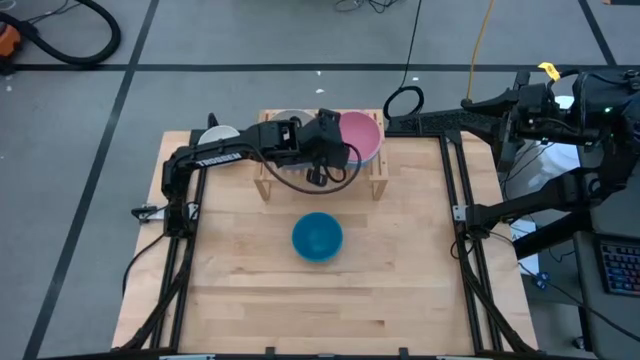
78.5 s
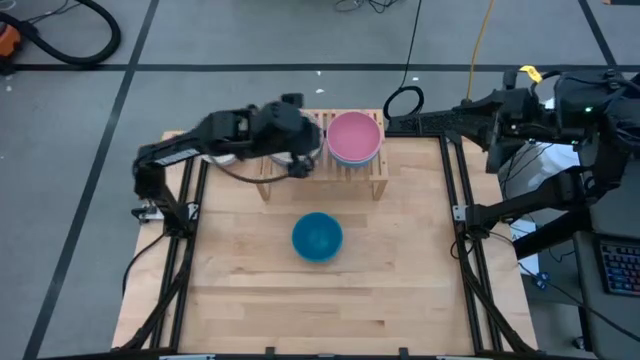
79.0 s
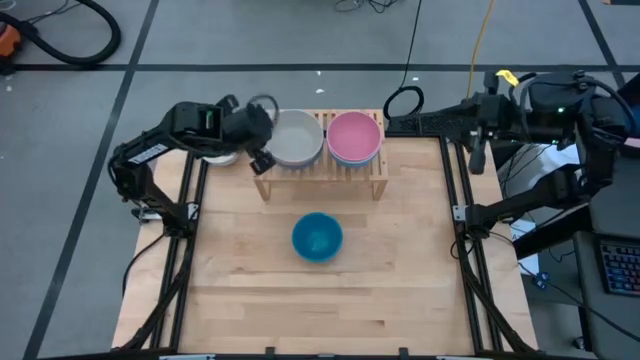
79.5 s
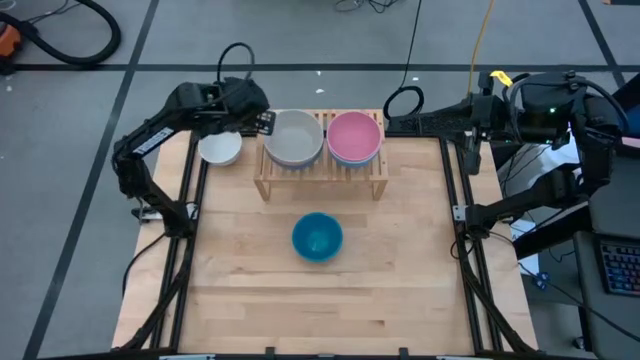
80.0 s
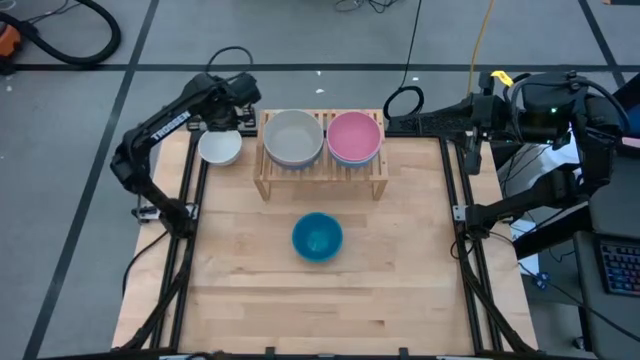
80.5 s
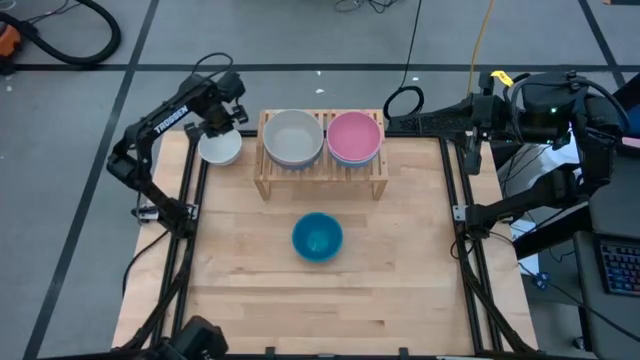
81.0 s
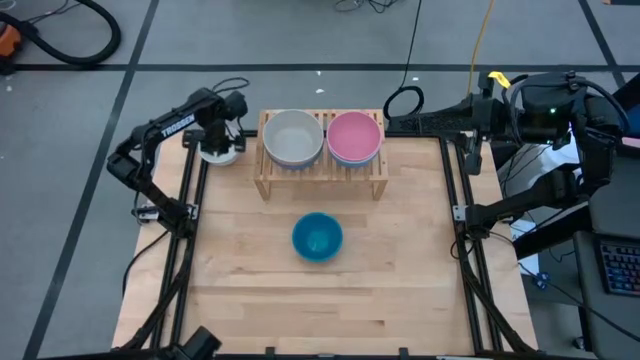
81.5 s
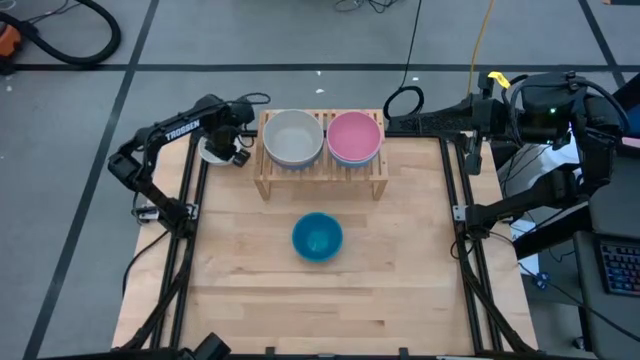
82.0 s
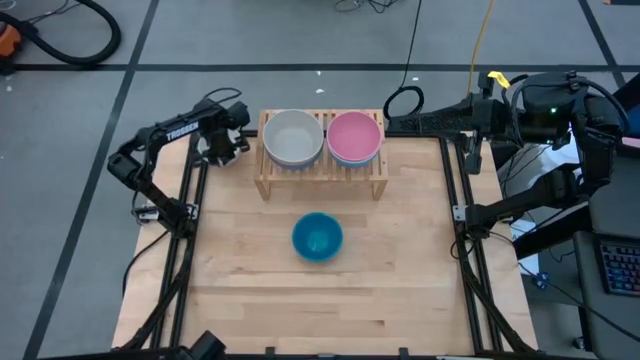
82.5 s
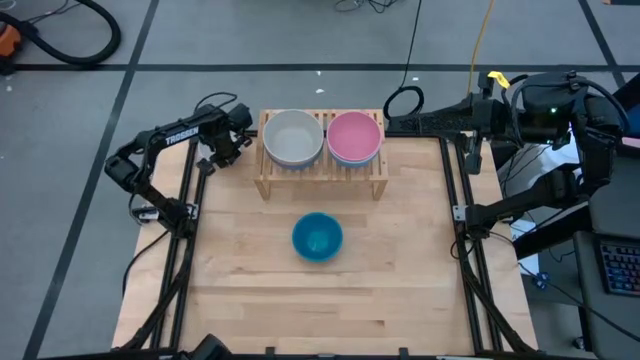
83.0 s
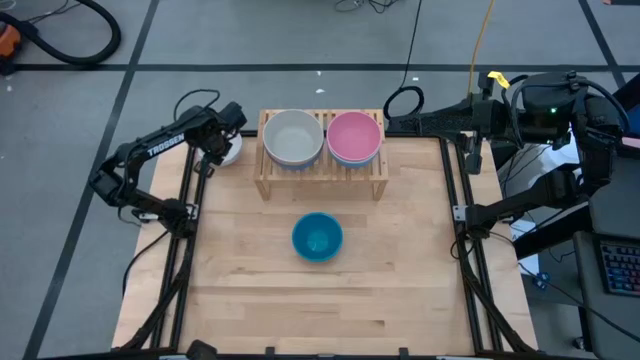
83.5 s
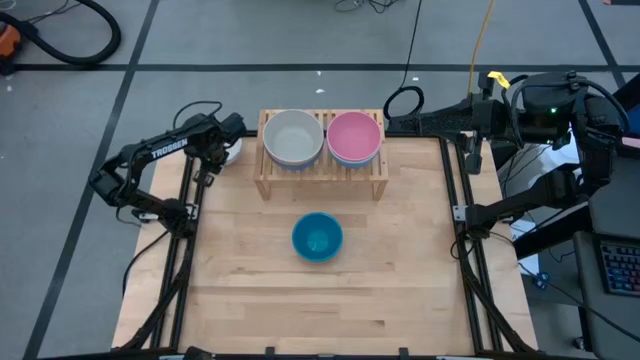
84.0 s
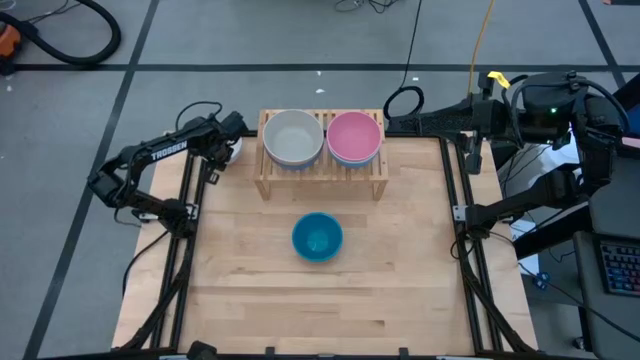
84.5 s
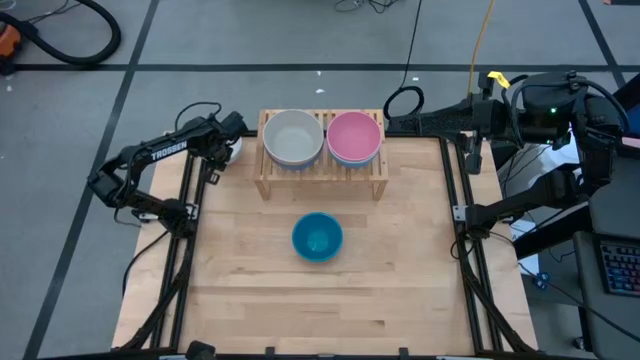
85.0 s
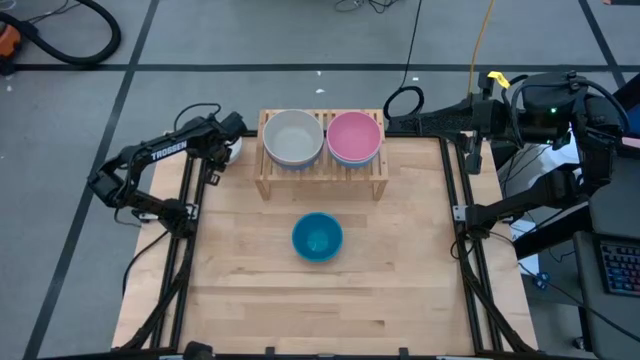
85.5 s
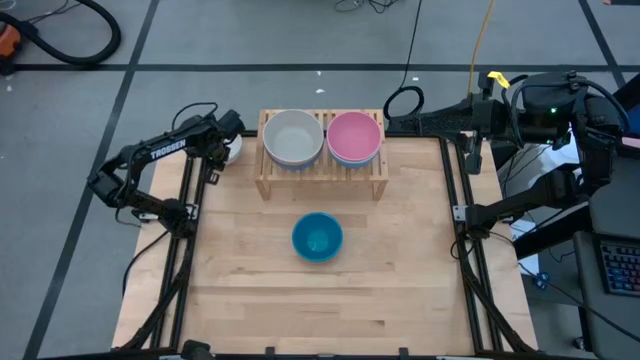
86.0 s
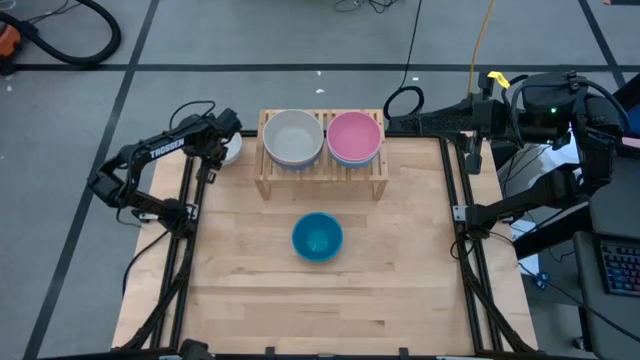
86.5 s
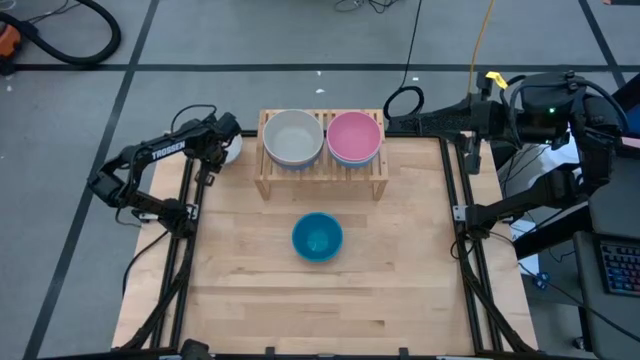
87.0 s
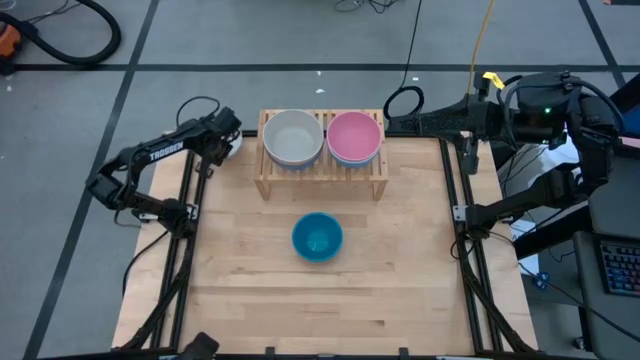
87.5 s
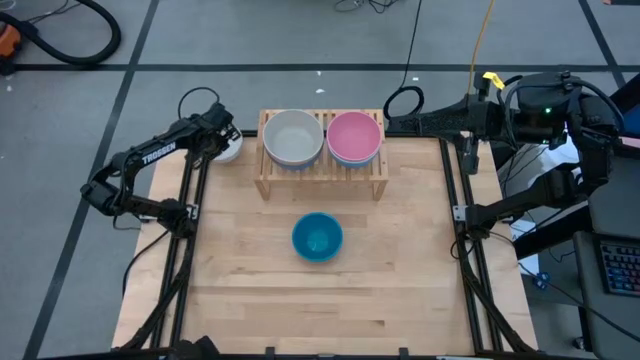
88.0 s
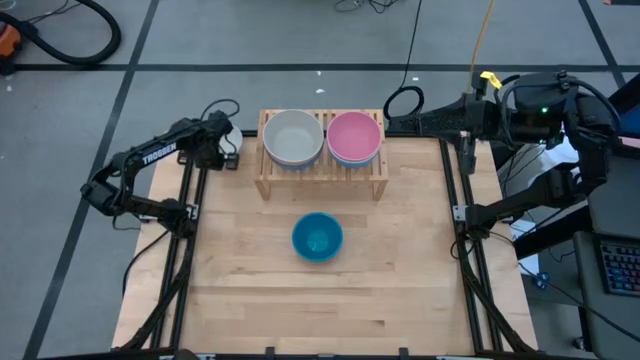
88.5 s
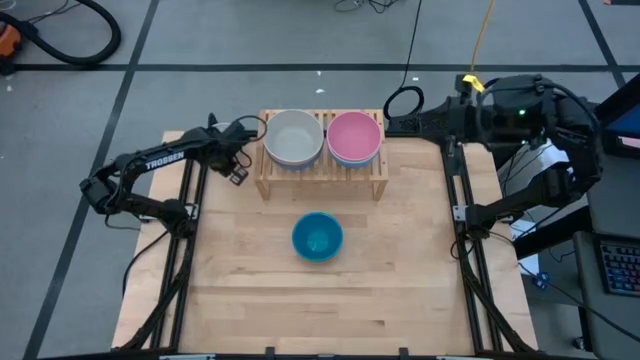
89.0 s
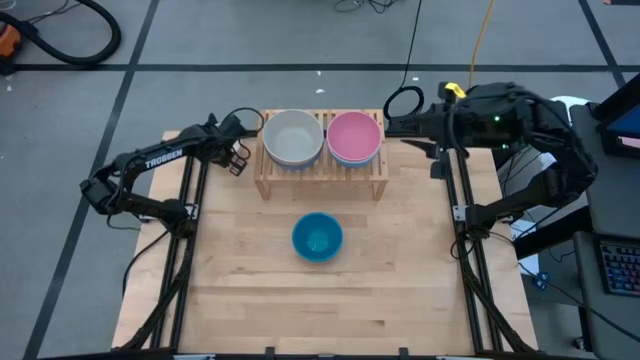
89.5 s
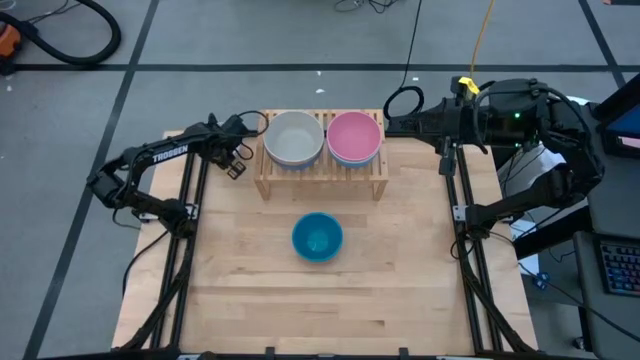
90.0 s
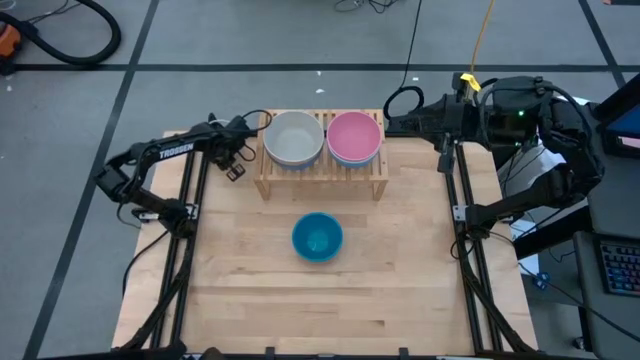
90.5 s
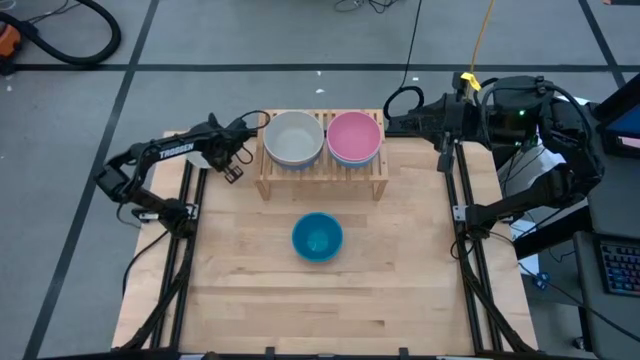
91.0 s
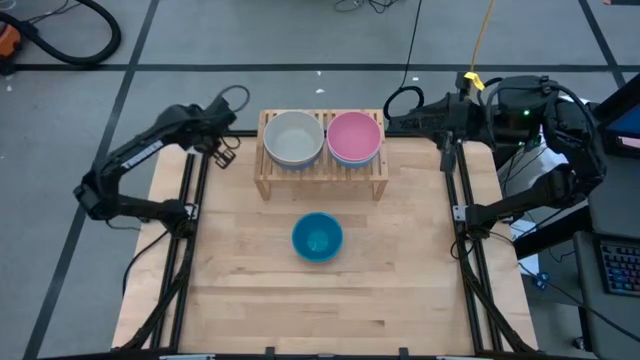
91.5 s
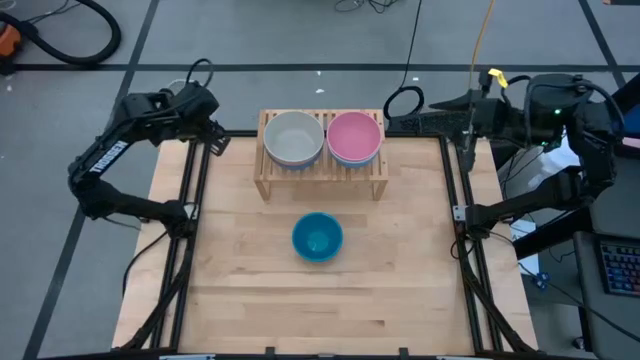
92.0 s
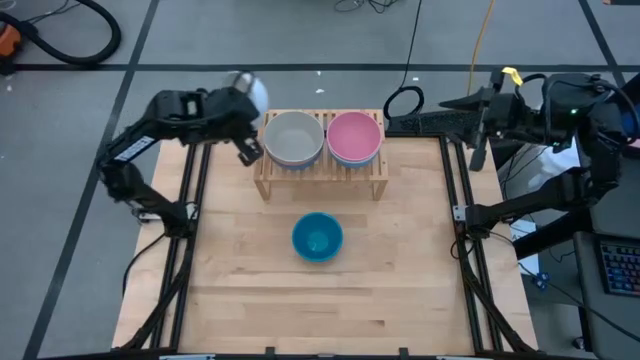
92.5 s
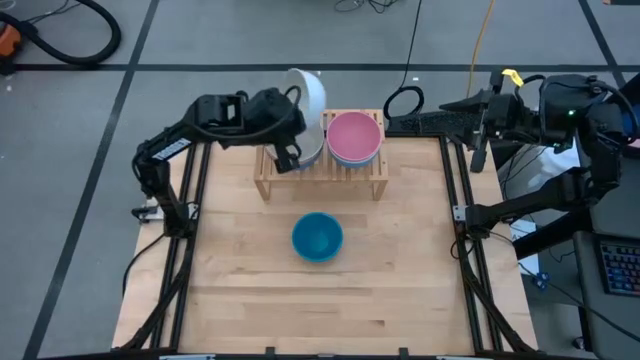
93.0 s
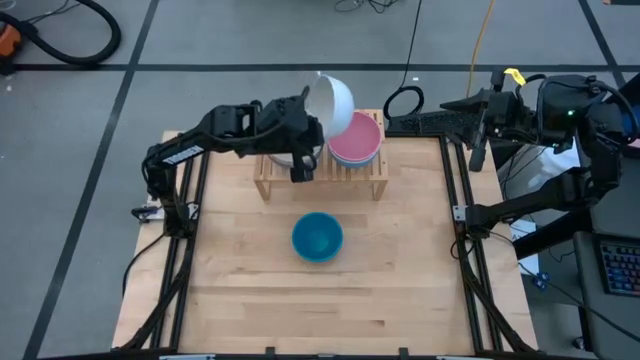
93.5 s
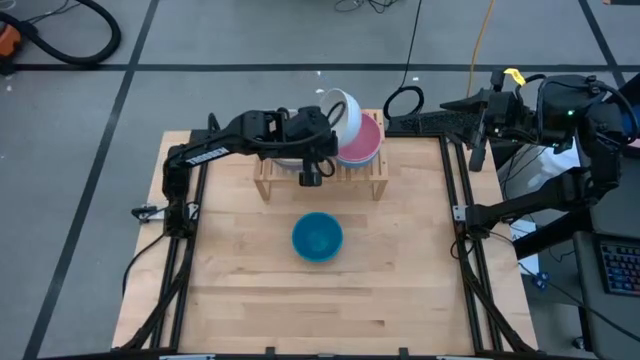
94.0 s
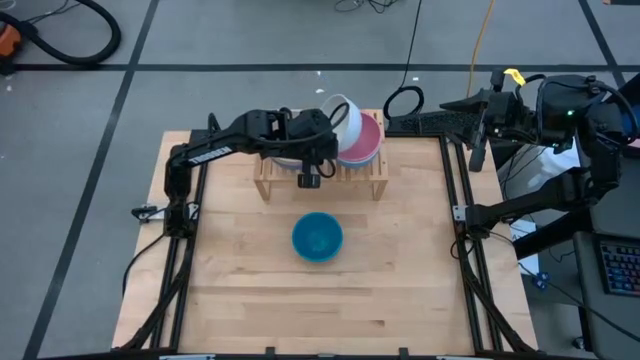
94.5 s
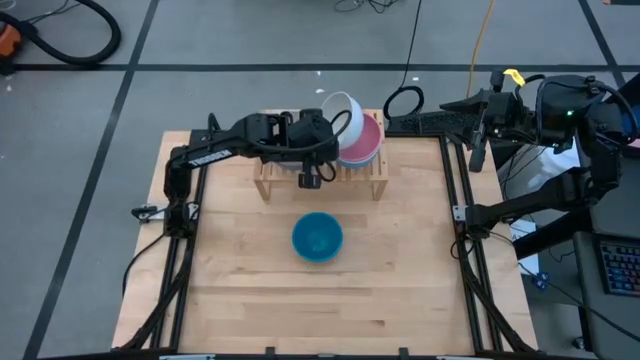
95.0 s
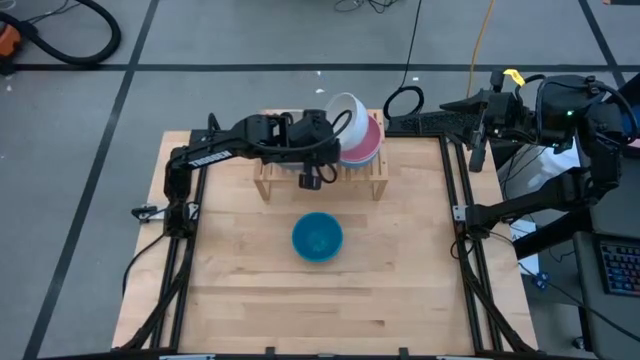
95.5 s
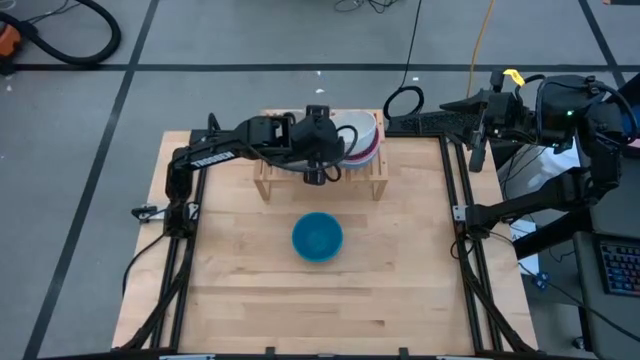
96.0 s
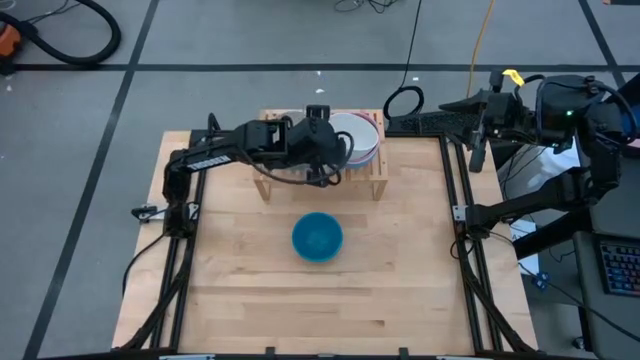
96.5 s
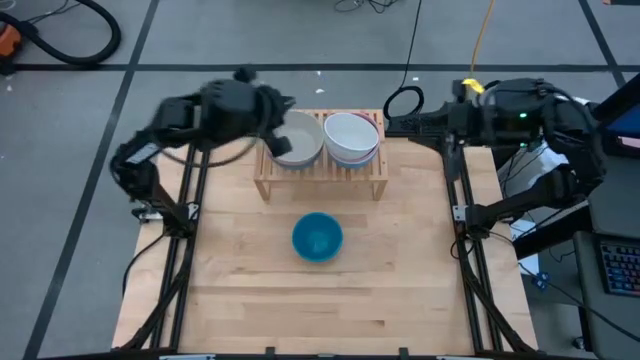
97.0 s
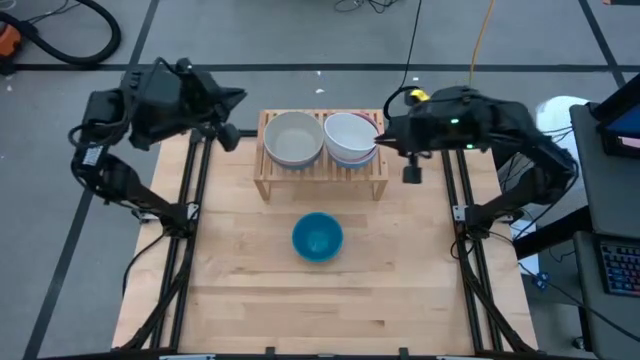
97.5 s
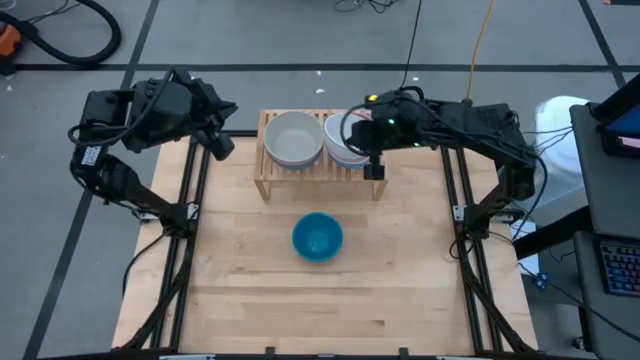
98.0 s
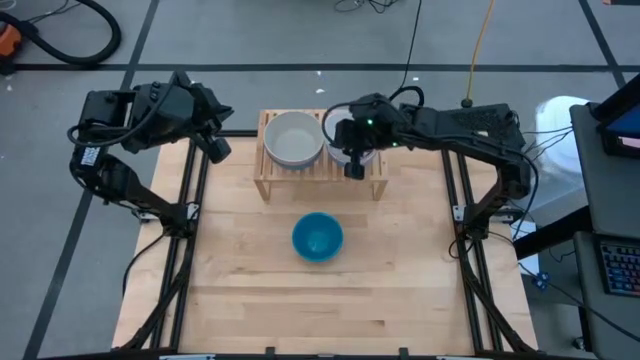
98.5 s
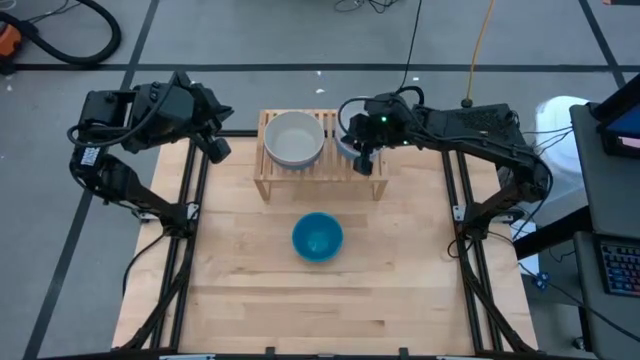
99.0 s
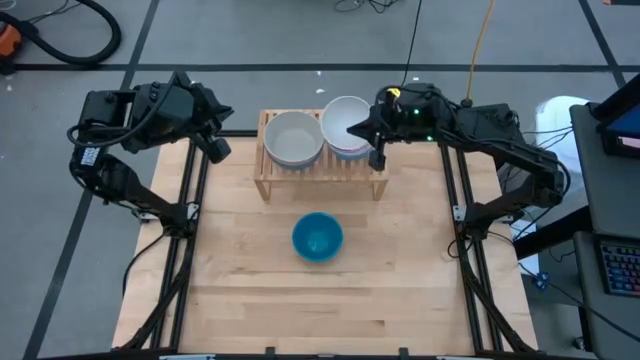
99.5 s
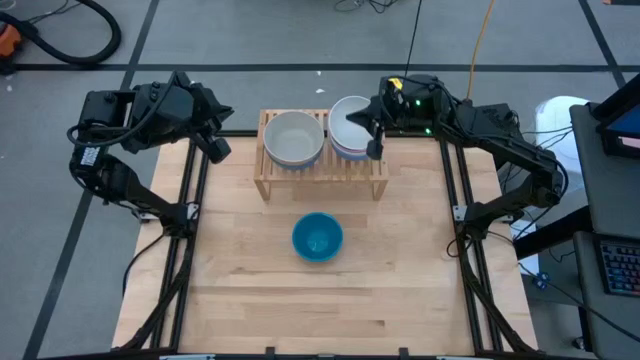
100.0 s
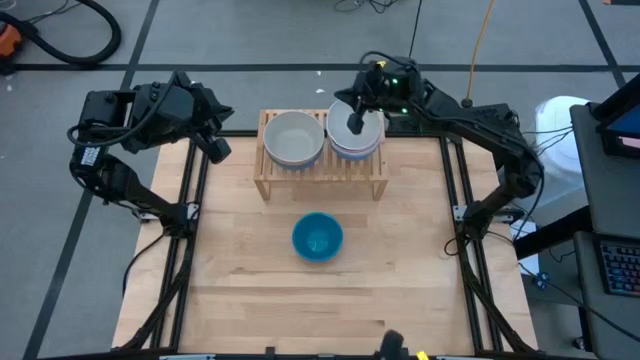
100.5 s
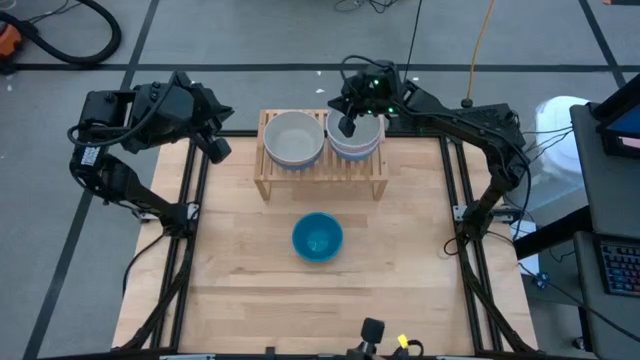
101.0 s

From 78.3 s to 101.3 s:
Task: Place and stack bowls onto a shelf
Stack the white bowl on top of the pink bowl on the shelf
